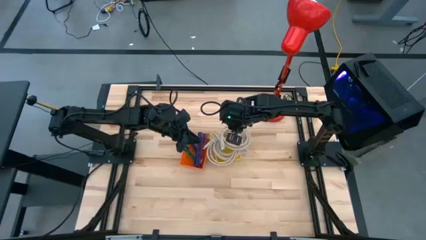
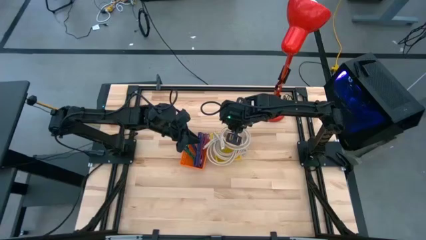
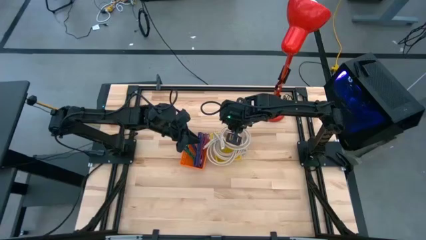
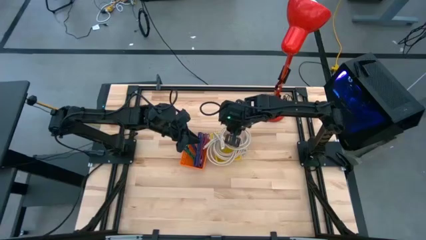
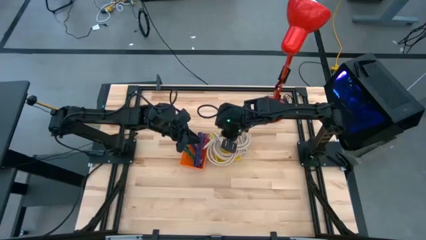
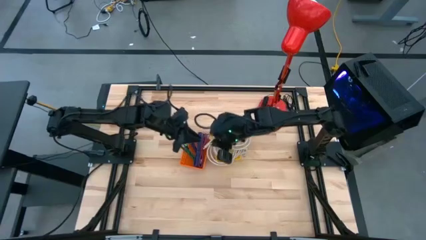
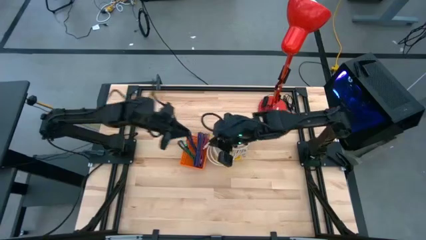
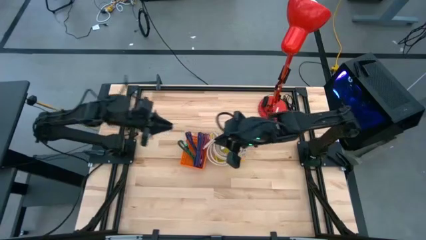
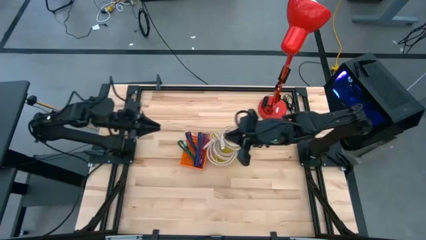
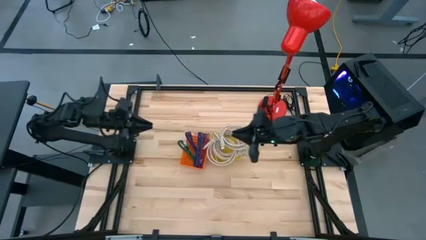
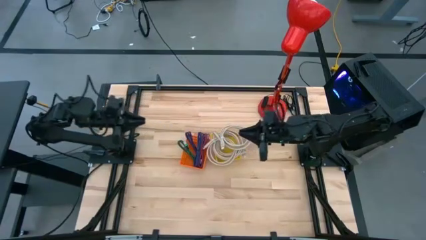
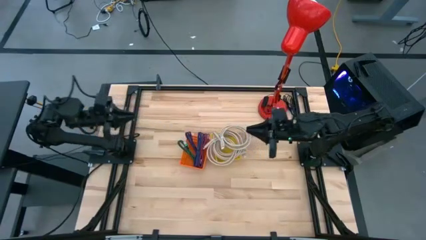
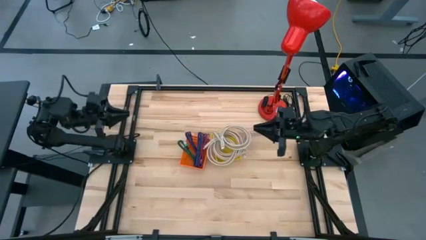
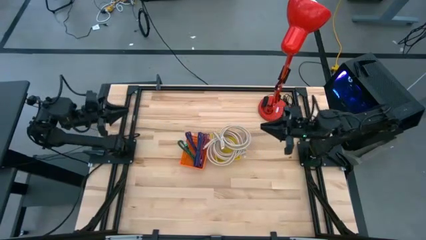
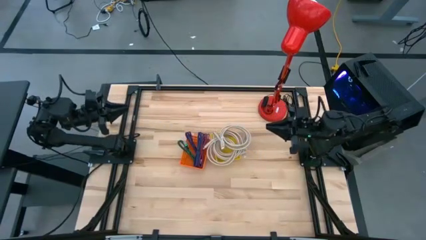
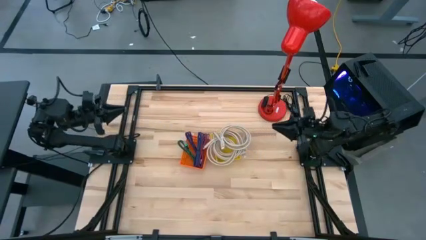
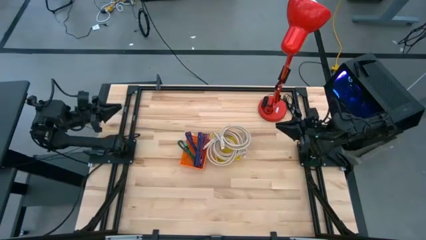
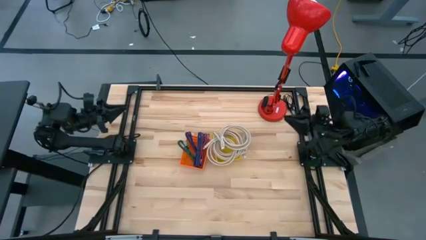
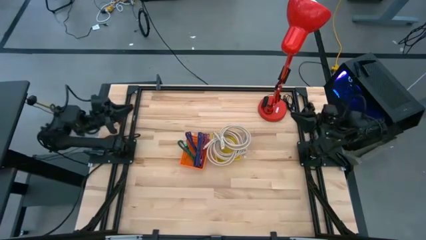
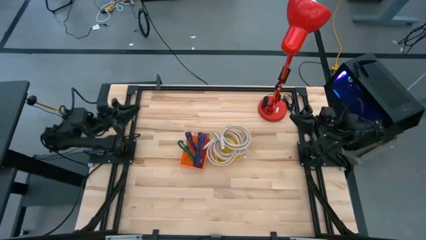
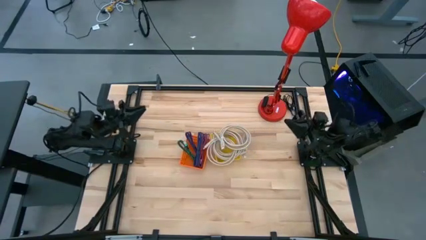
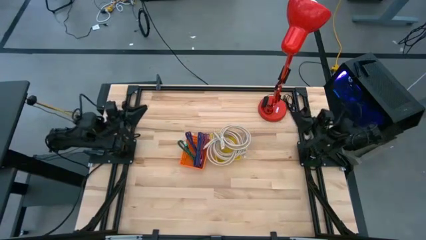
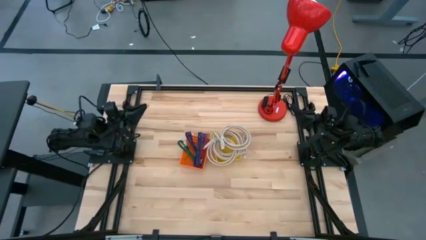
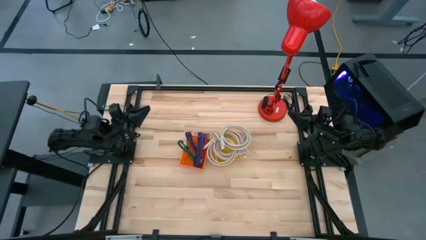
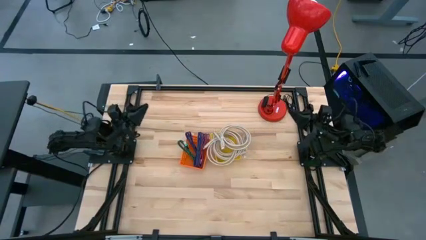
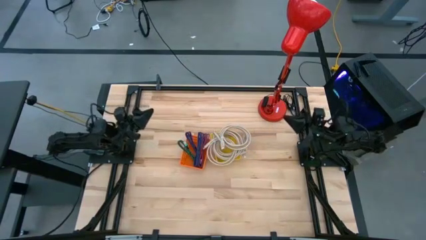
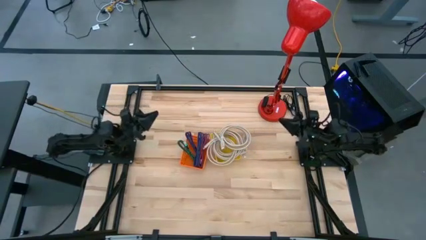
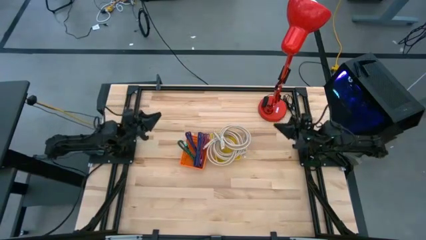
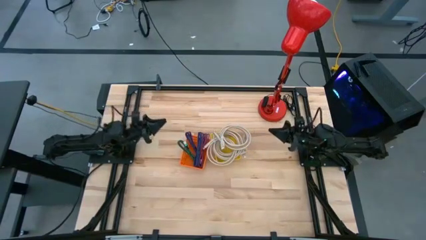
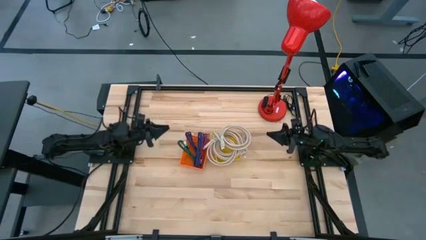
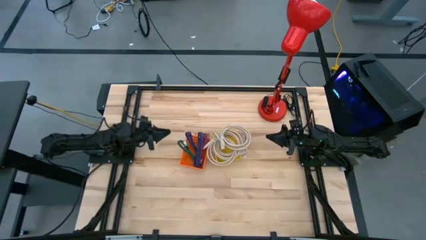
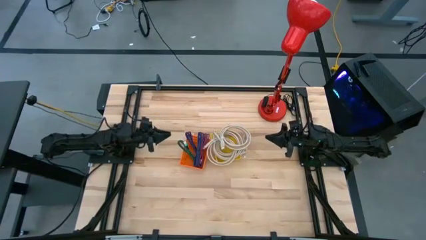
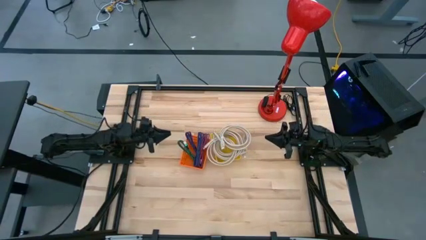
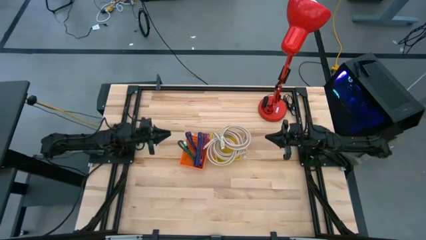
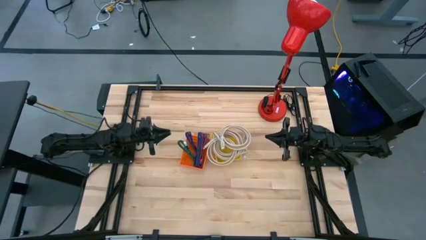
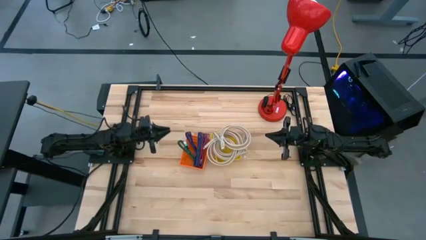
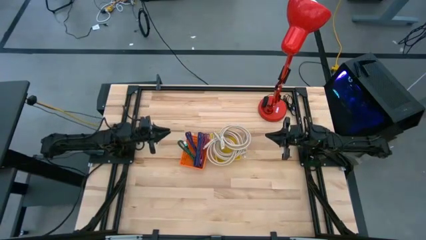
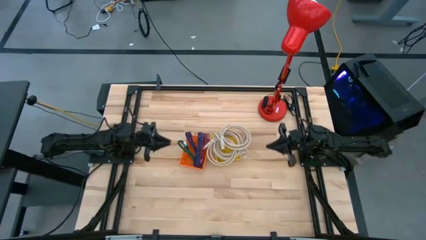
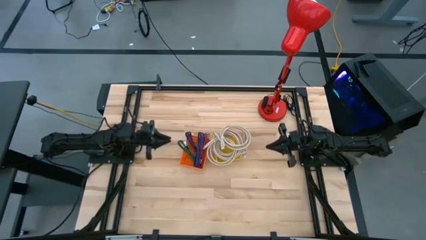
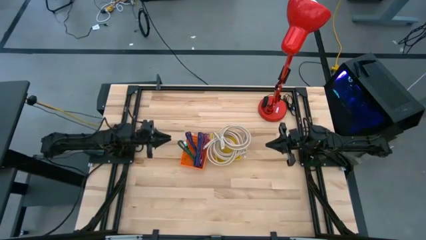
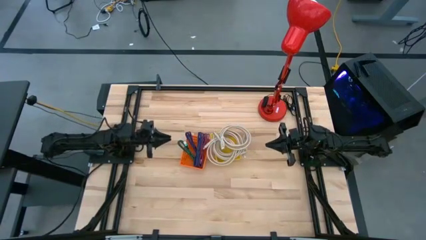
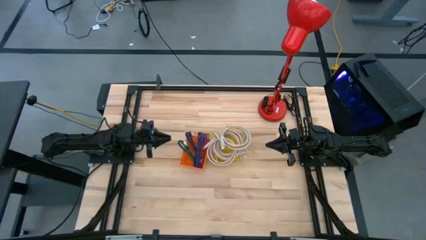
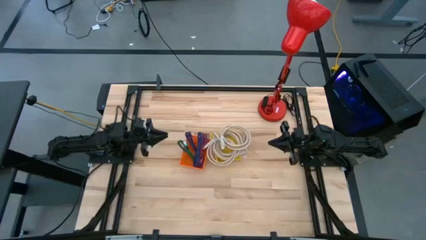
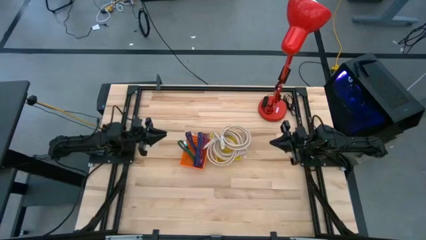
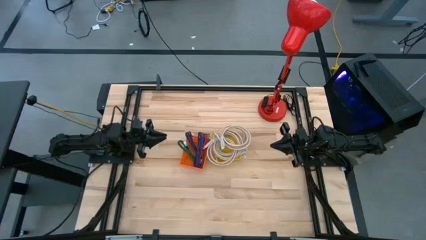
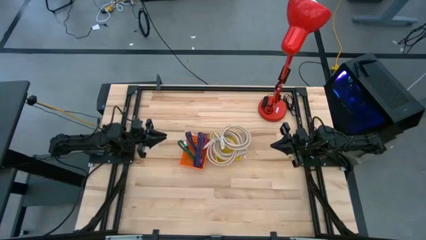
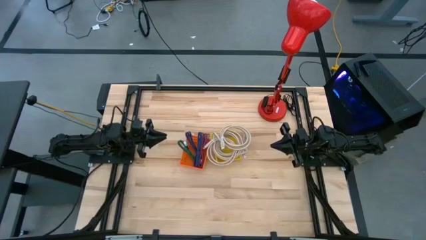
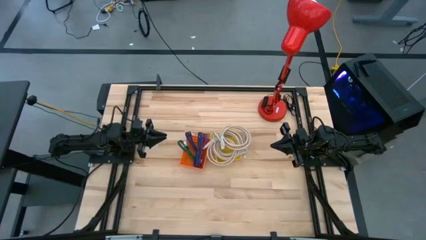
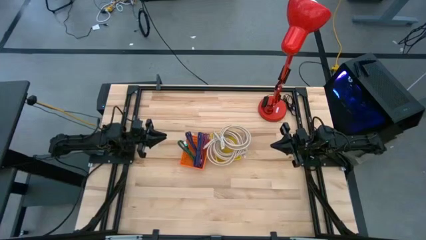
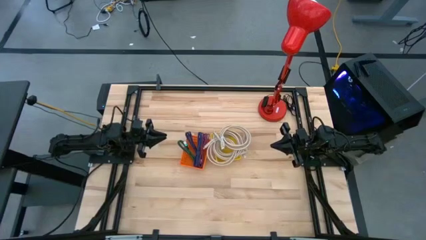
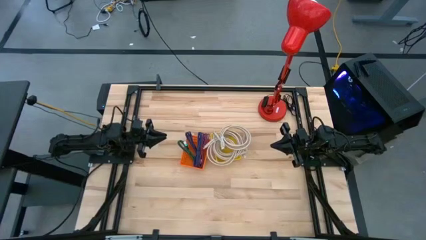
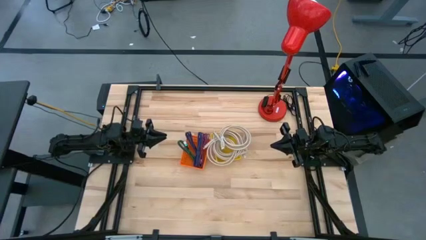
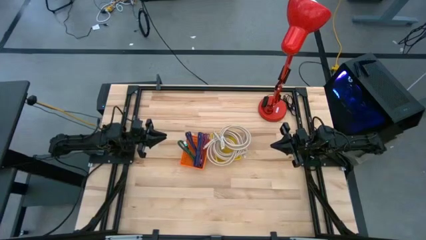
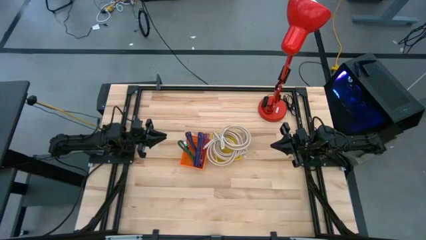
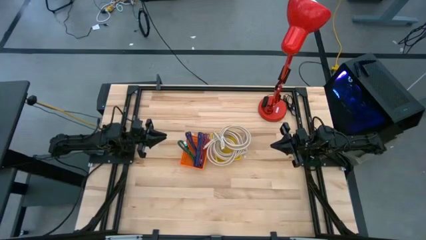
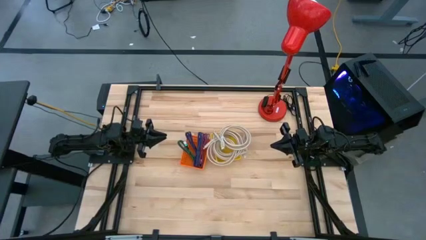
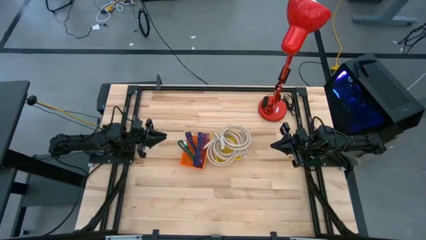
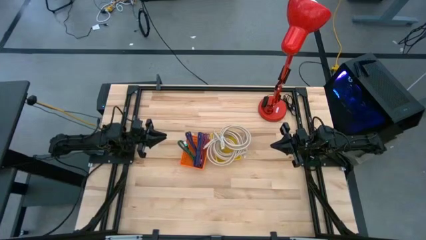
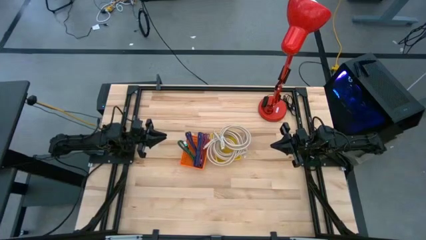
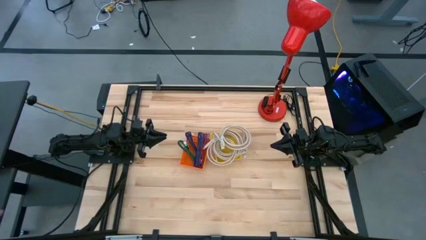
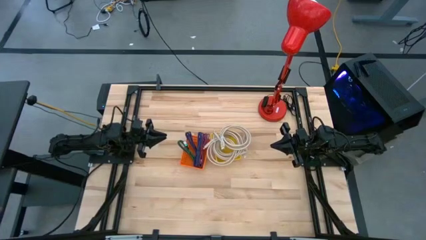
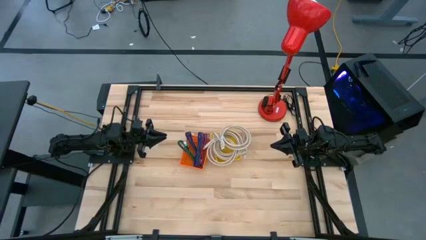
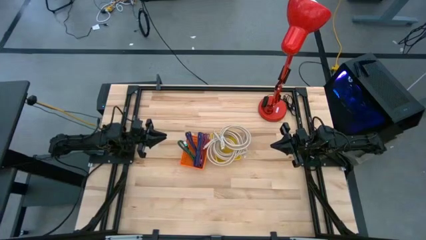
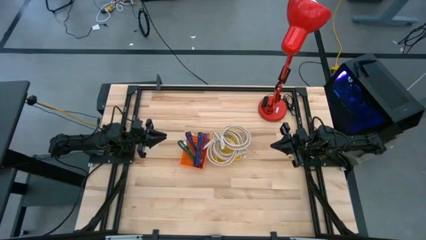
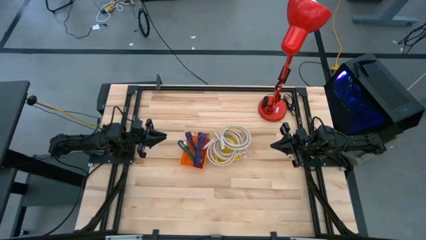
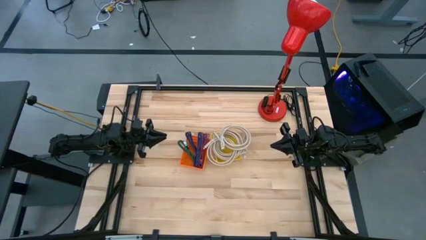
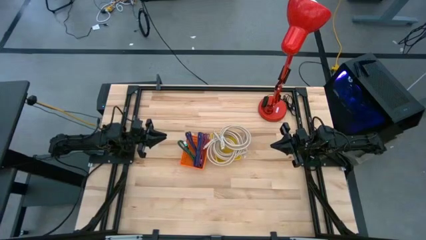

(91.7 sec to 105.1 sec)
Task: Pick & Place USB Port
Return to Home Position

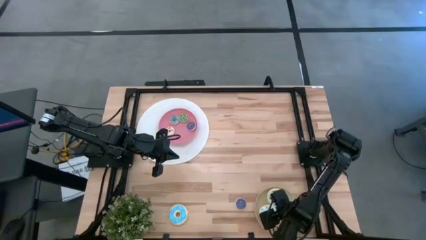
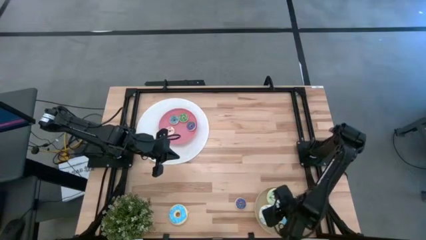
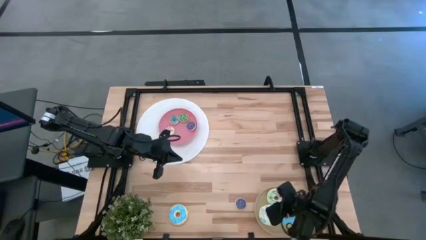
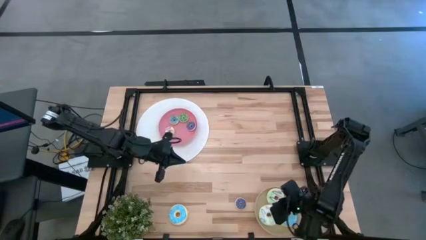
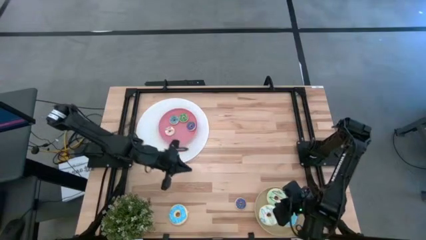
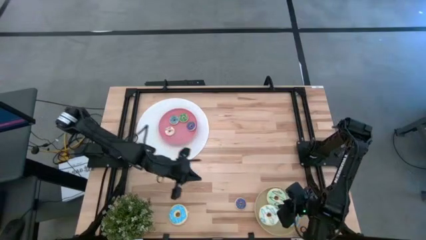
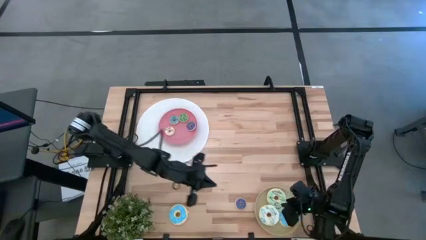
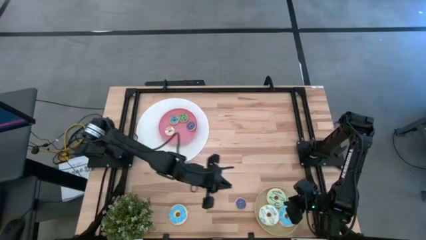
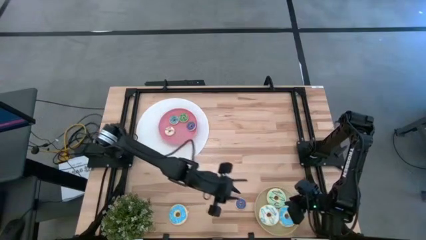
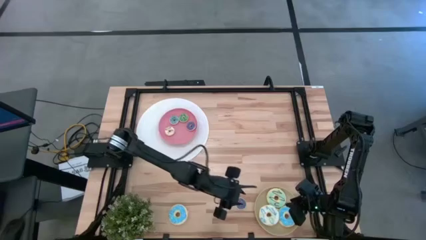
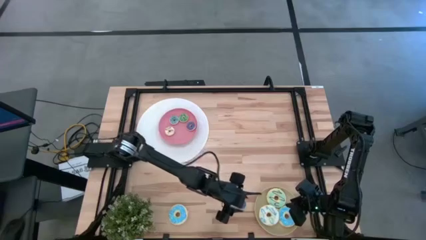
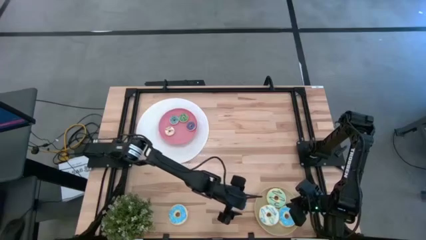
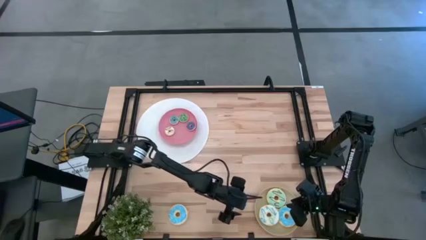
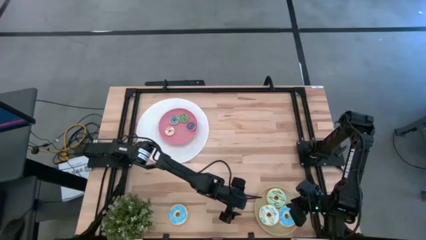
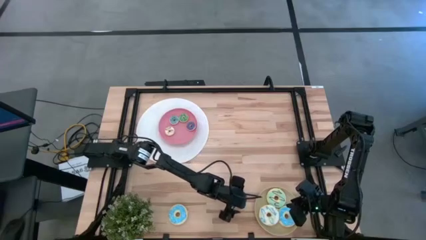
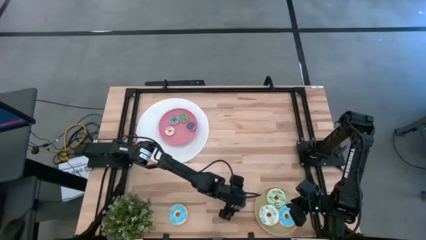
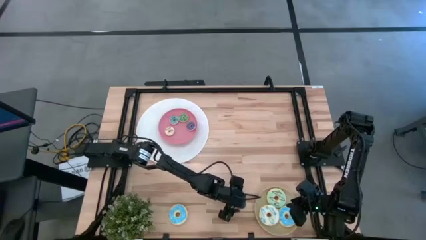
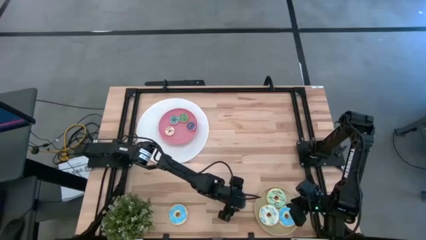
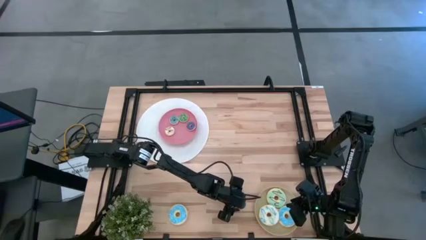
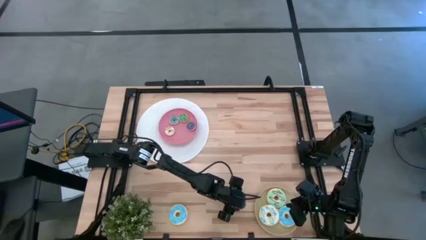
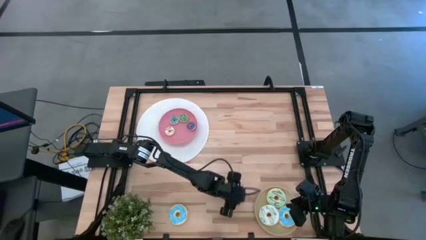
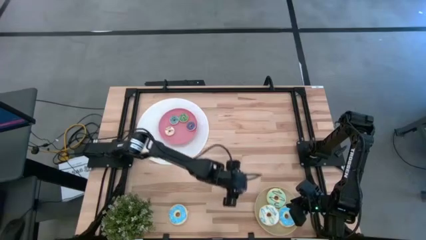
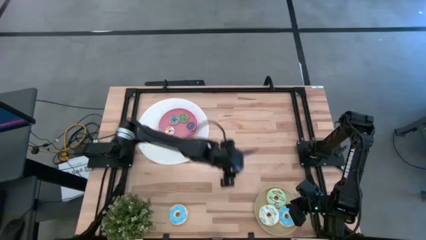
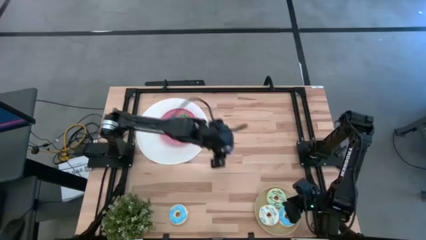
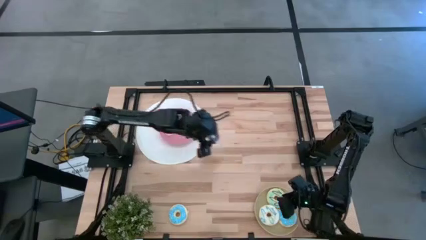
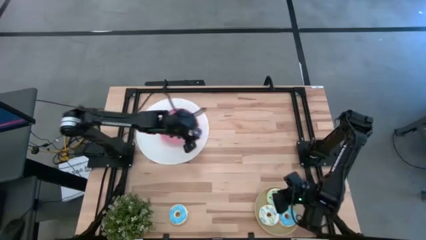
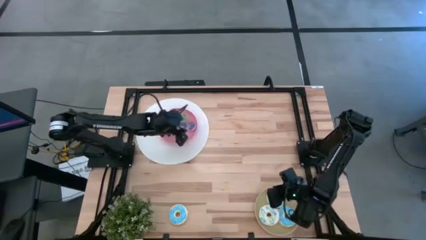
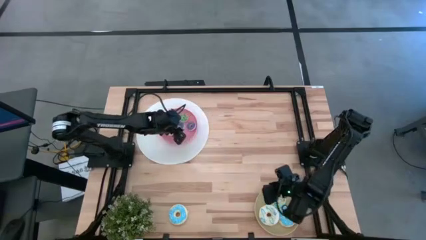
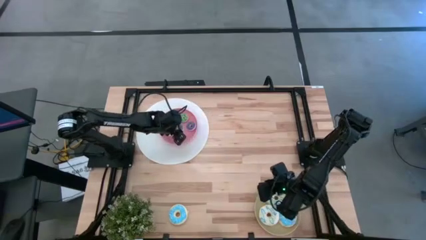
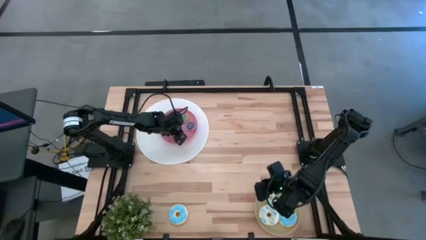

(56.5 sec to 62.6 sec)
Task: Pick & Place donuts
Put the small violet donut on the pink plate
